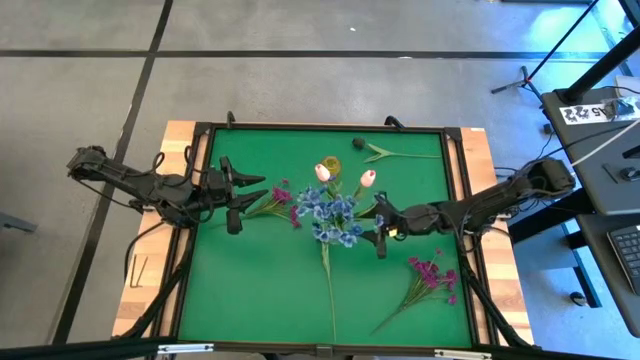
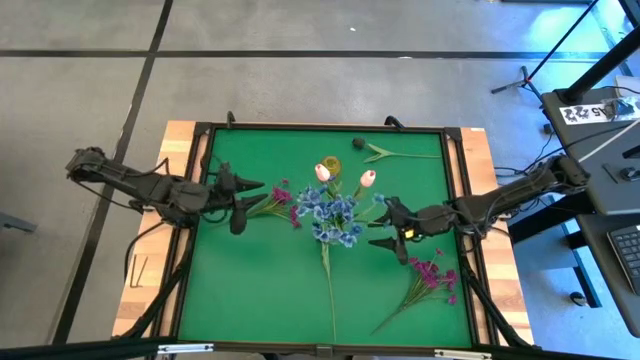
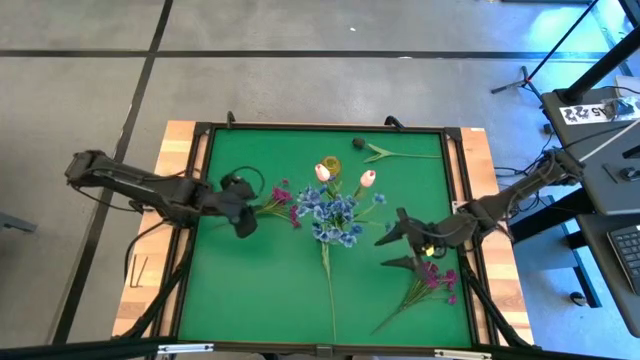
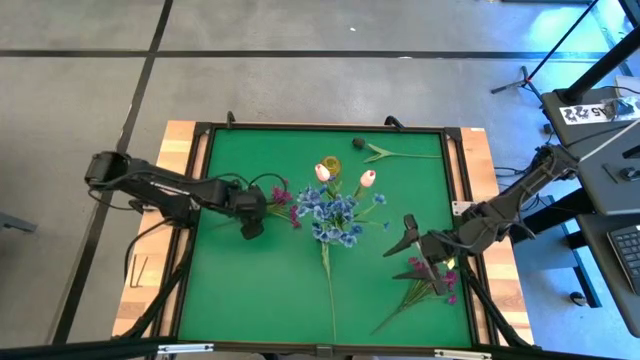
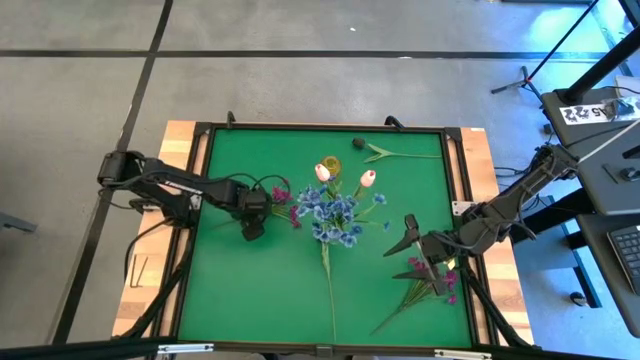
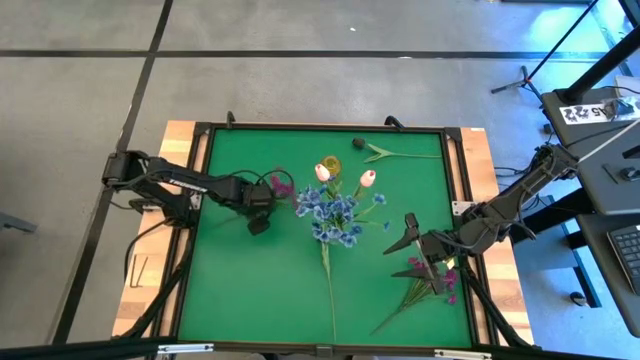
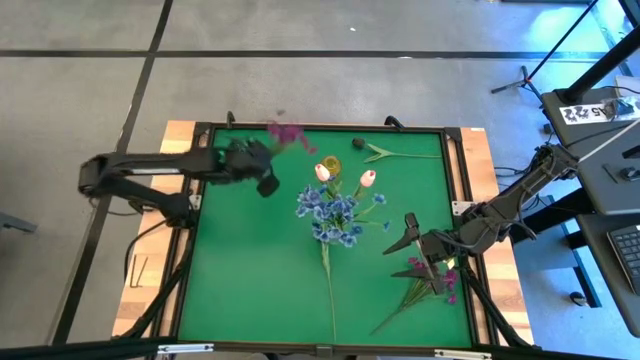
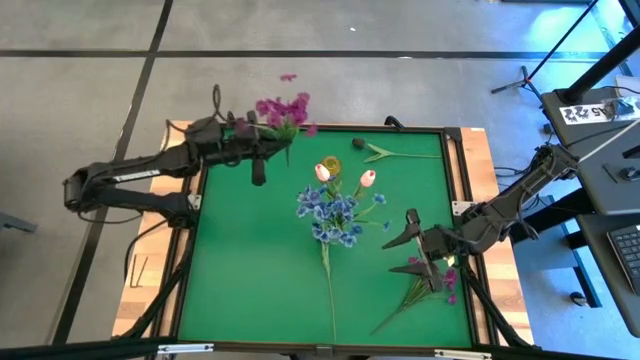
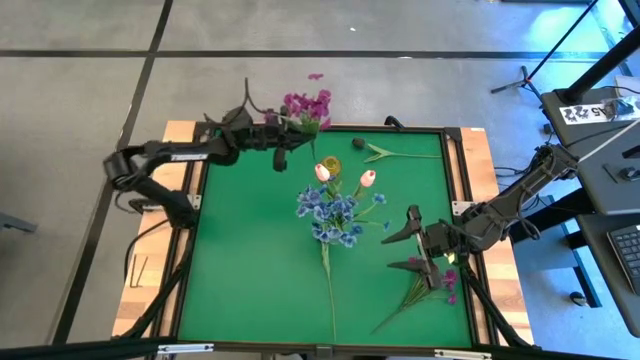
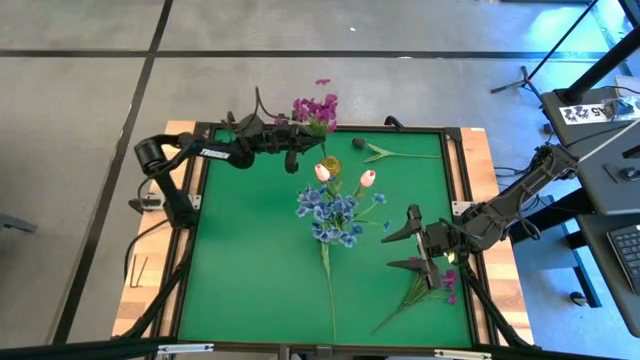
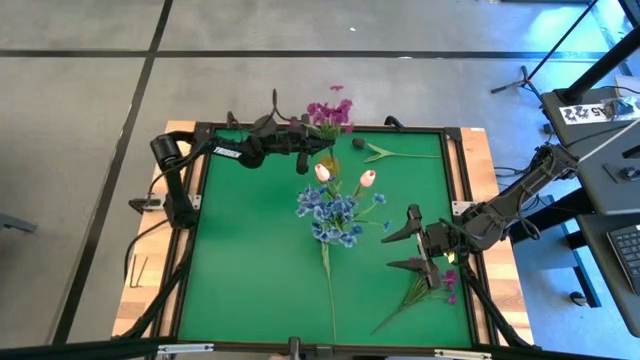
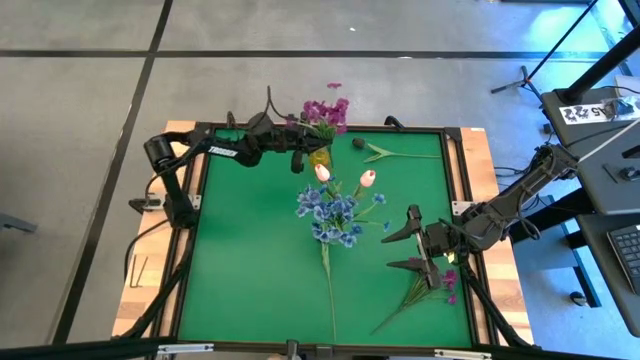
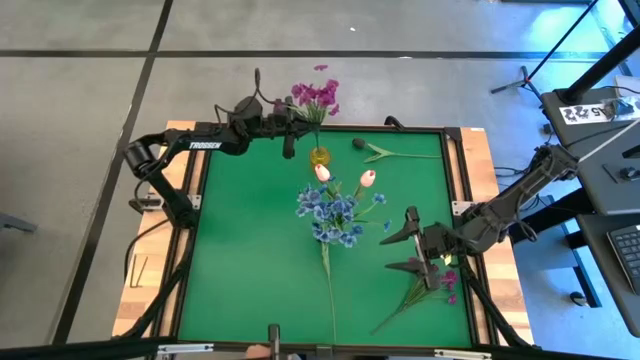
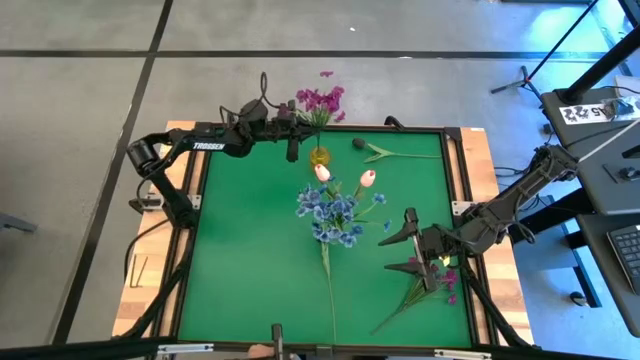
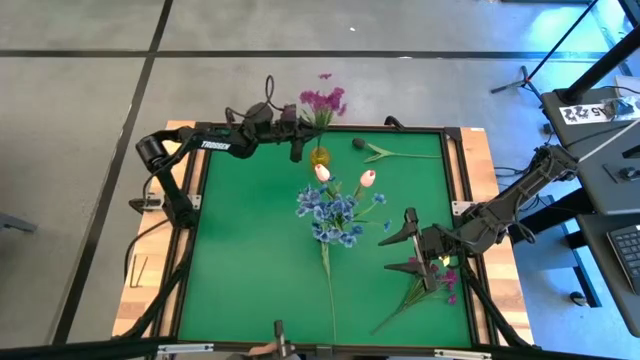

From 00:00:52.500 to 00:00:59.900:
Task: Sort flowers into vase by color
Put the left violet flowers into the yellow vase

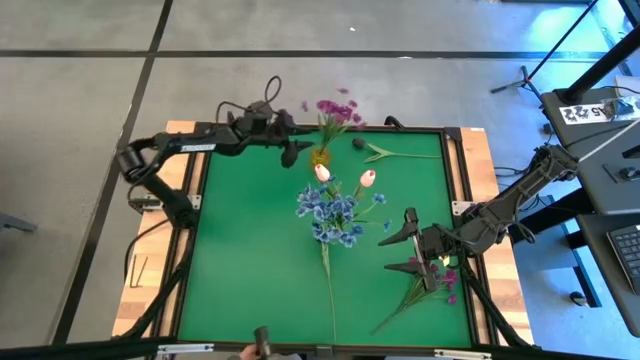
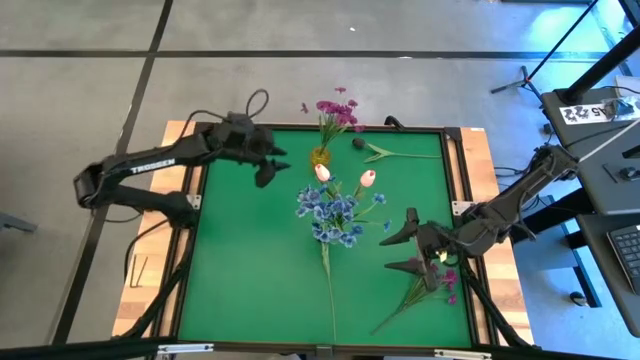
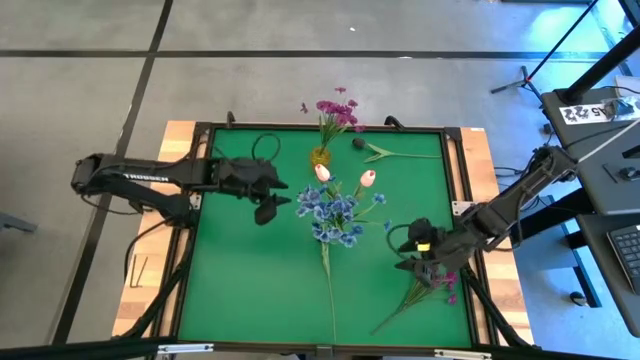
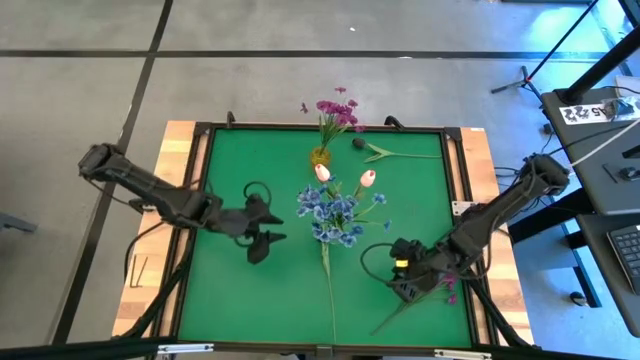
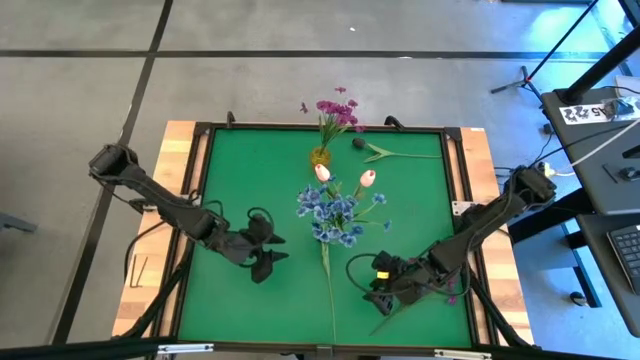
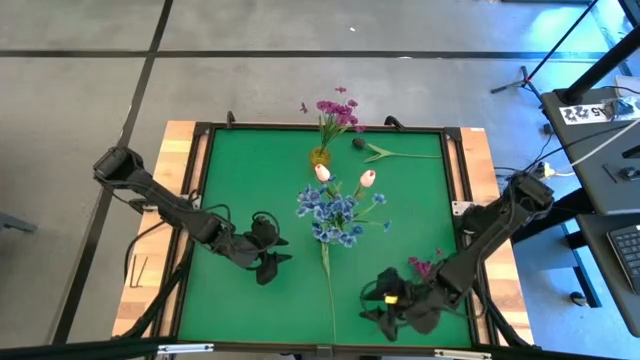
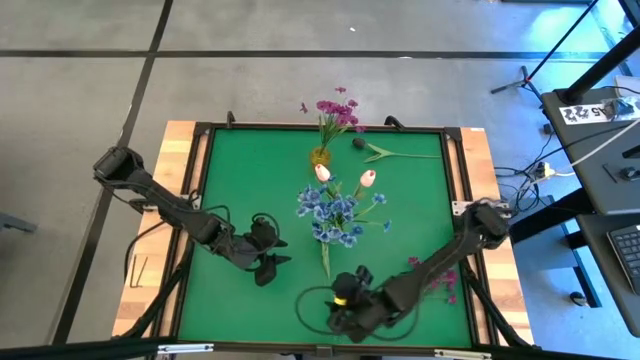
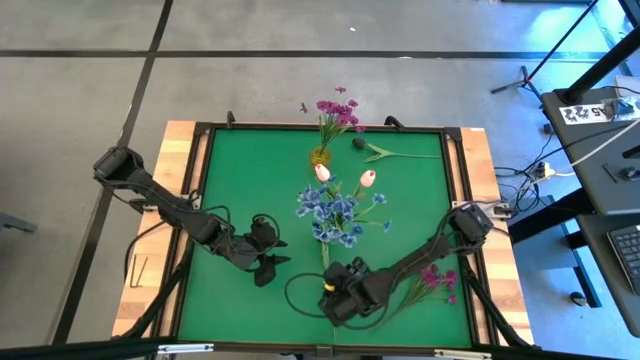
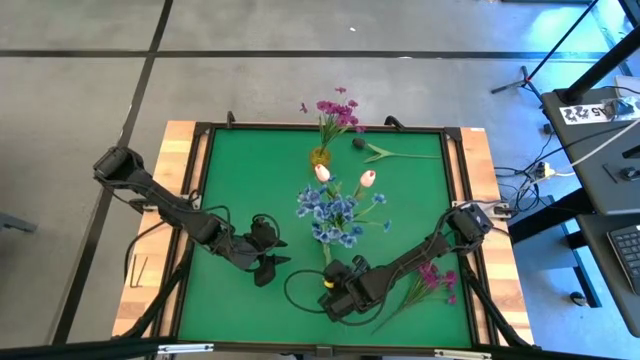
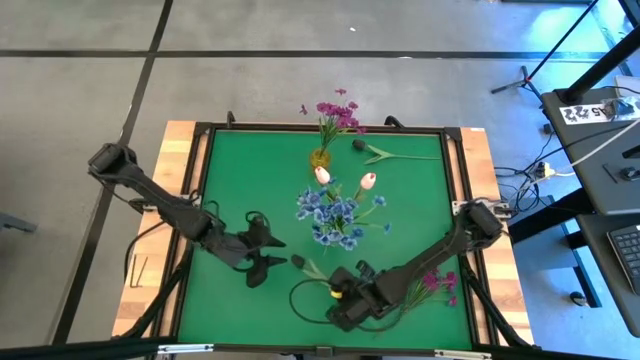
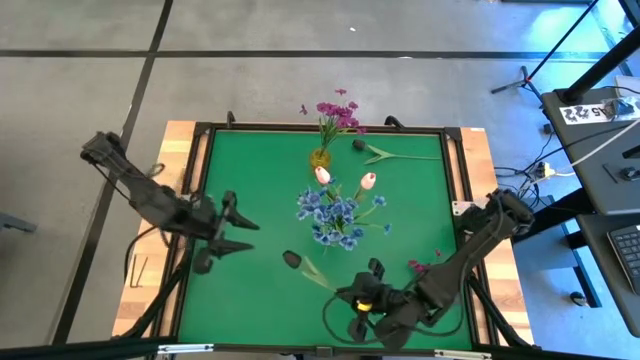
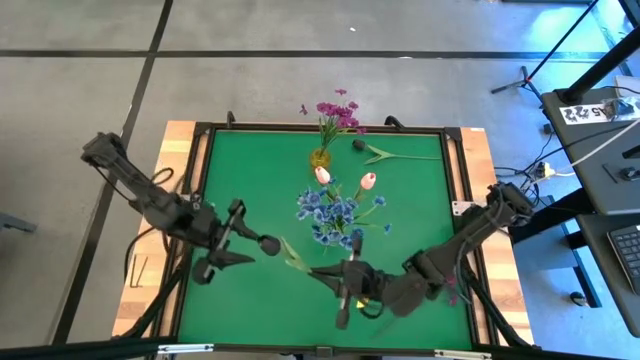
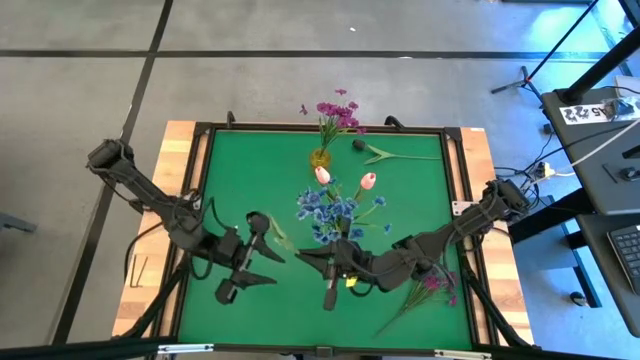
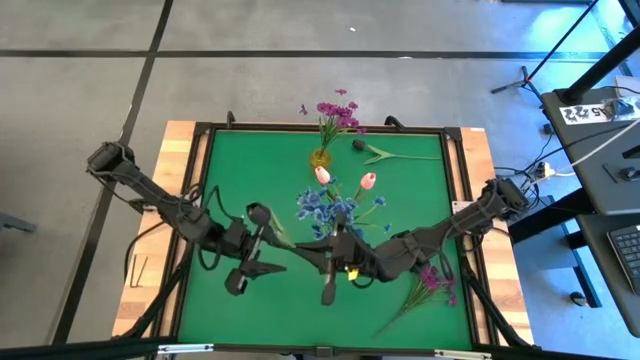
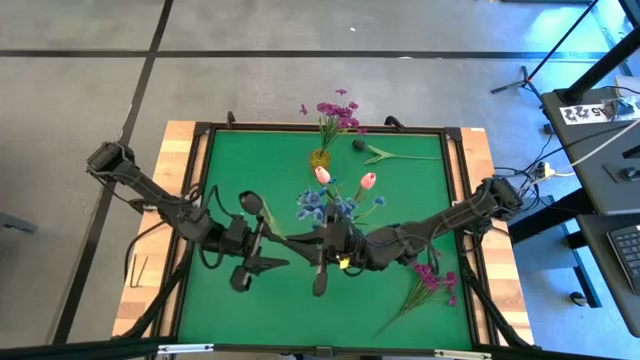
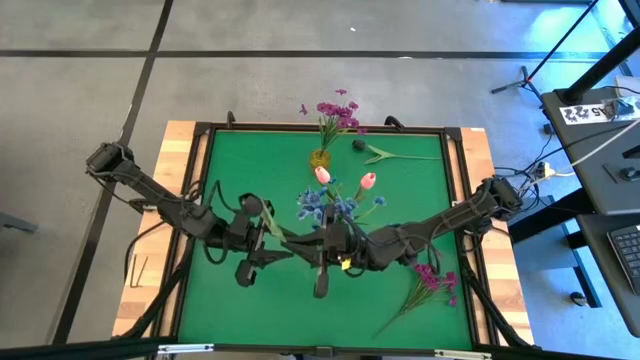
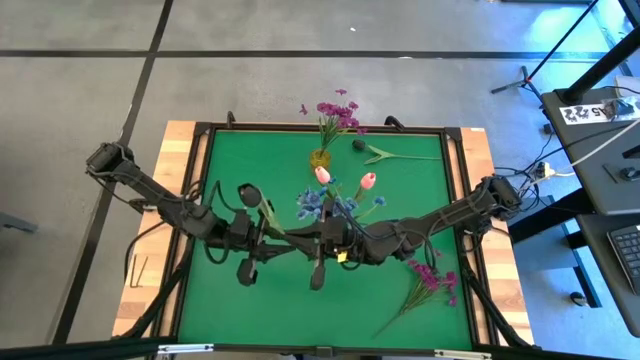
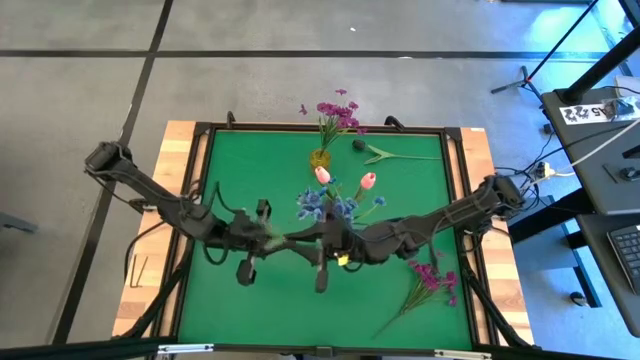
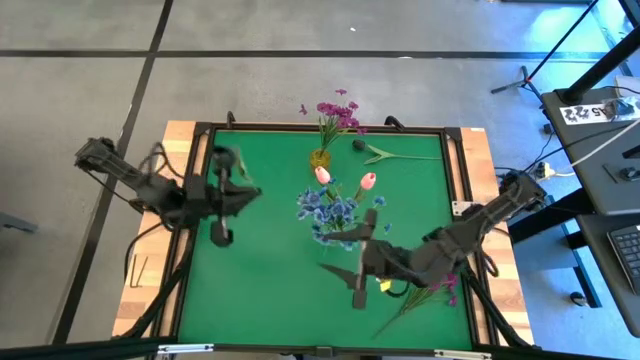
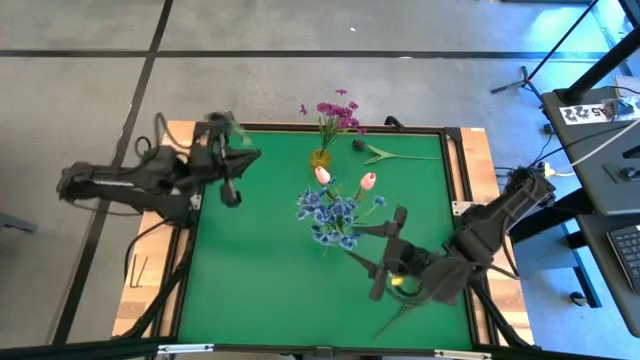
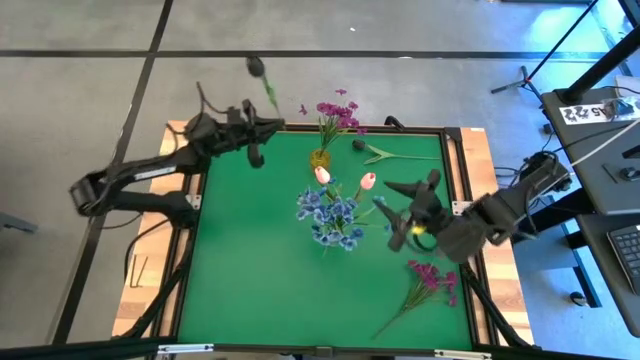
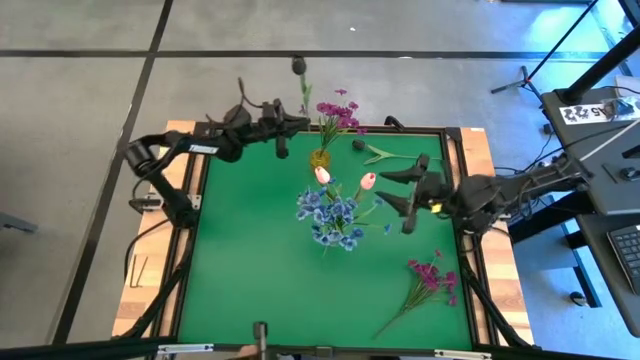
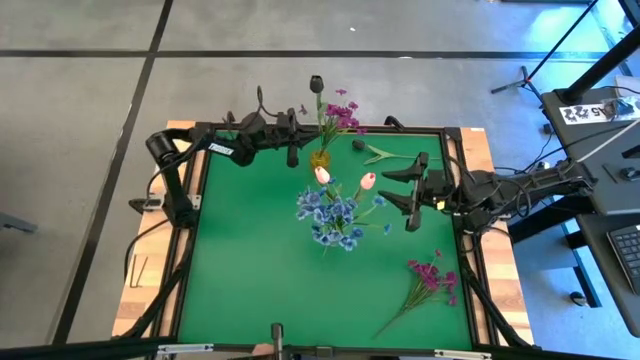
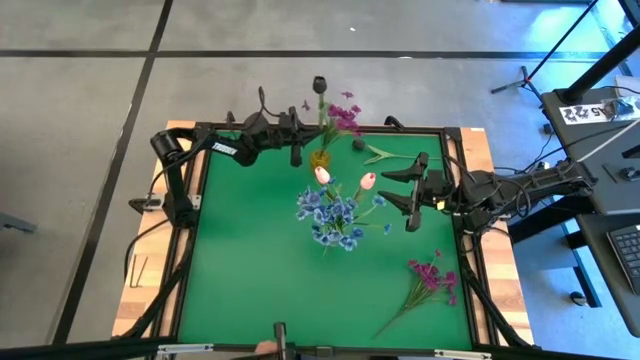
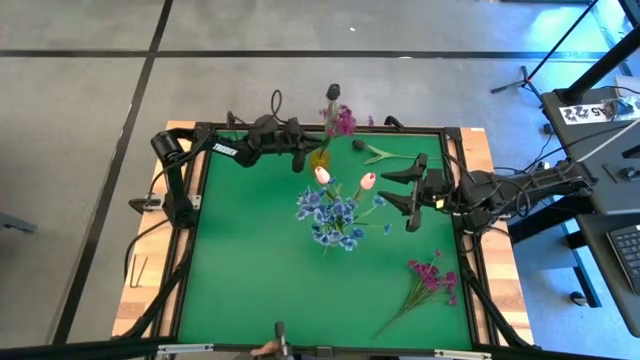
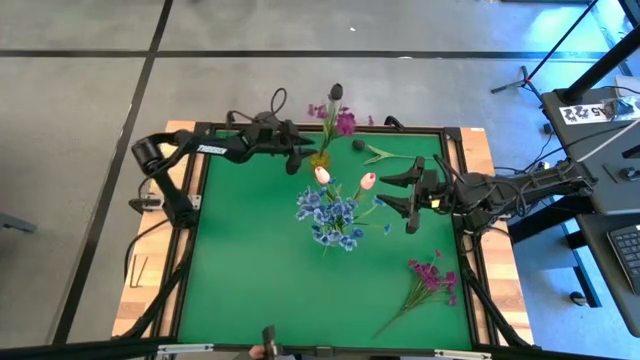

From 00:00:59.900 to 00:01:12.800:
Put the lower black flower into the yellow vase

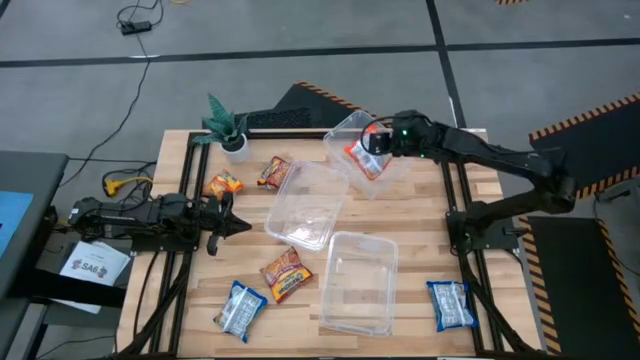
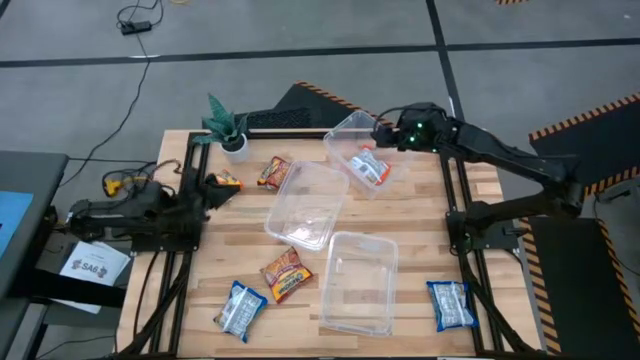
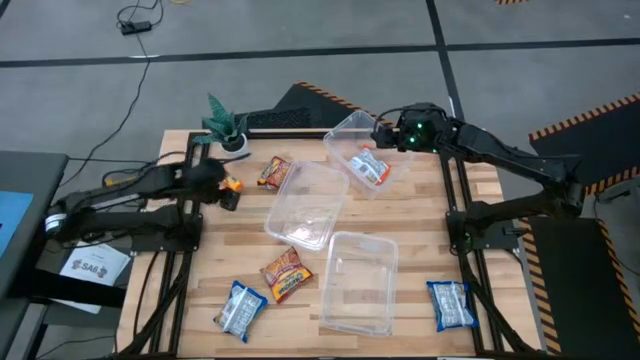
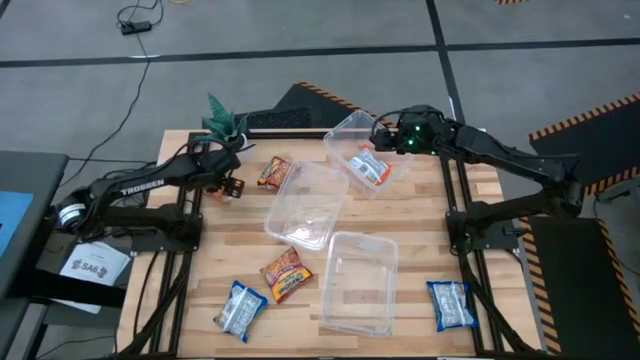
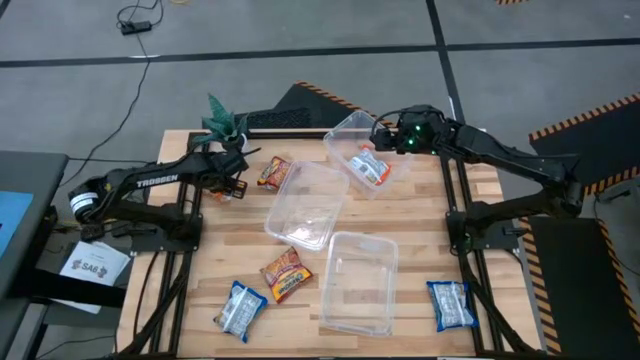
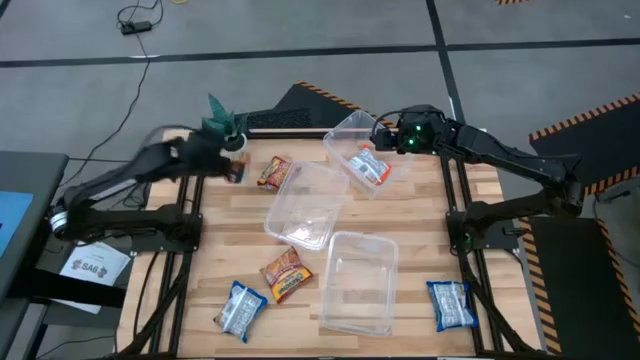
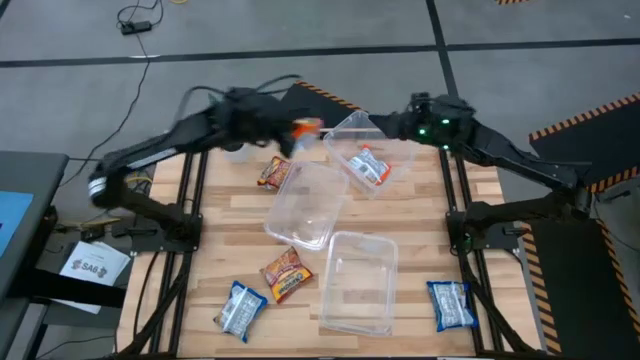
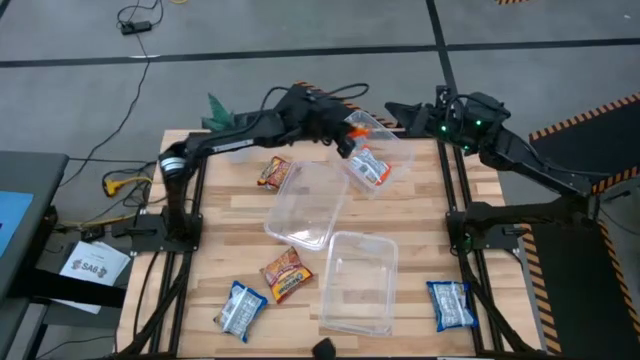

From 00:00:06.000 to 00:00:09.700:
Task: Sort Maruchan noodles
Put the orange noodle pack into the top transparent bin
